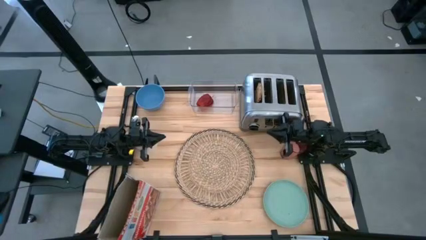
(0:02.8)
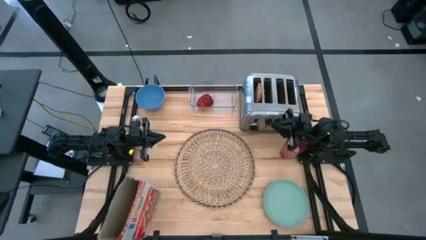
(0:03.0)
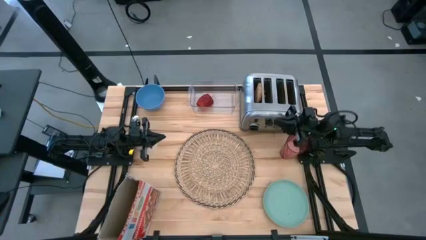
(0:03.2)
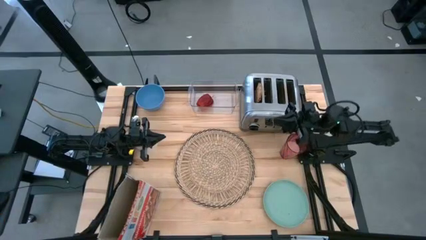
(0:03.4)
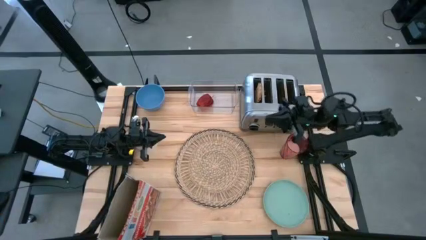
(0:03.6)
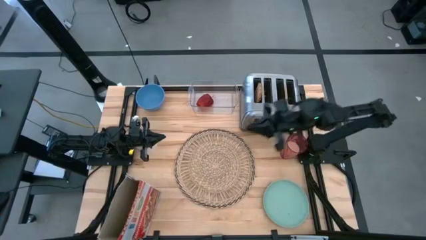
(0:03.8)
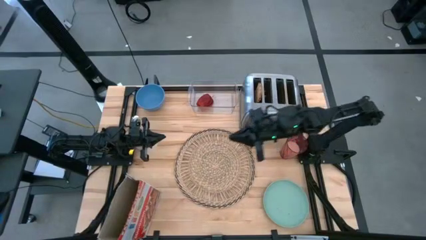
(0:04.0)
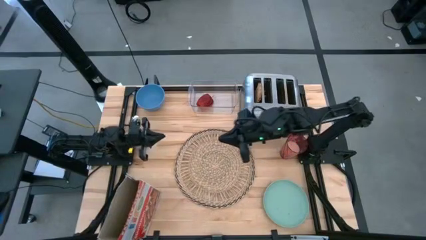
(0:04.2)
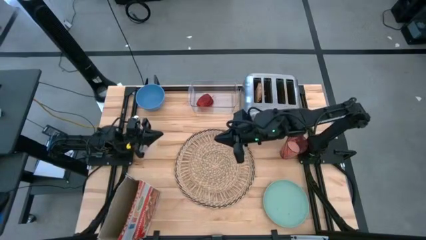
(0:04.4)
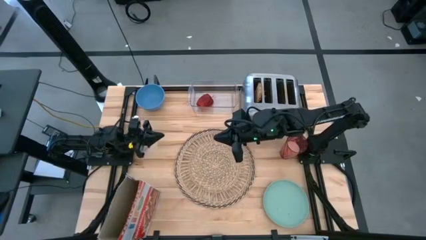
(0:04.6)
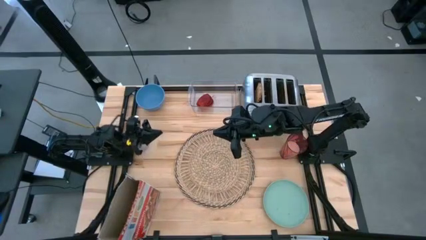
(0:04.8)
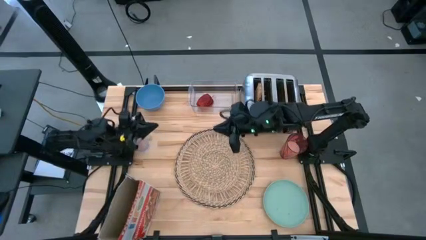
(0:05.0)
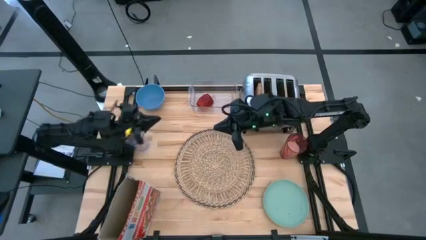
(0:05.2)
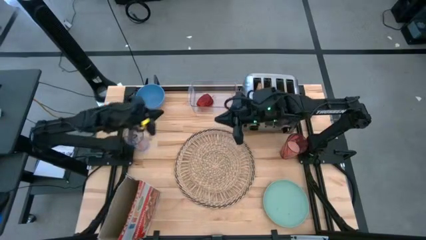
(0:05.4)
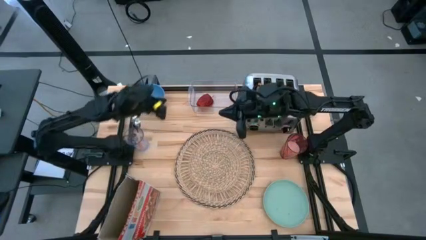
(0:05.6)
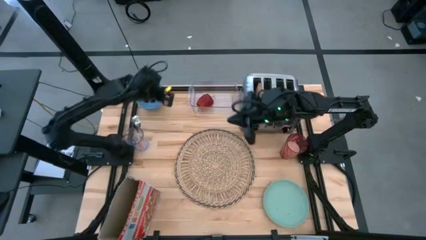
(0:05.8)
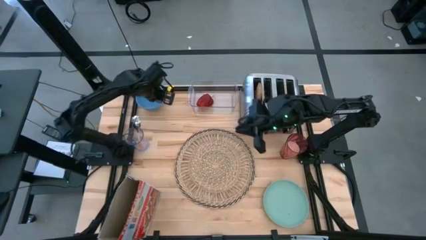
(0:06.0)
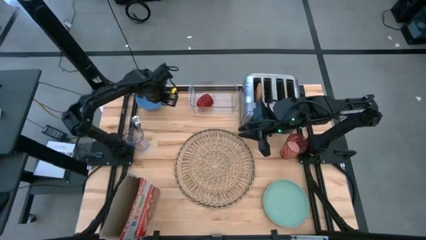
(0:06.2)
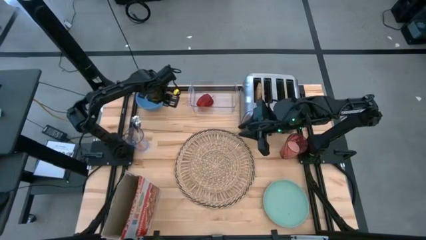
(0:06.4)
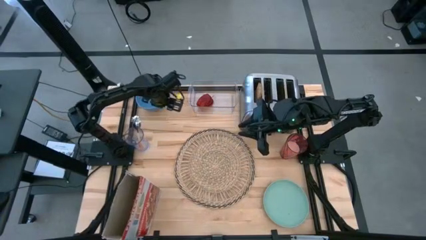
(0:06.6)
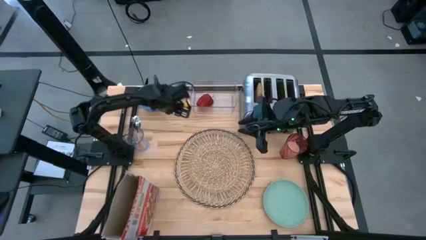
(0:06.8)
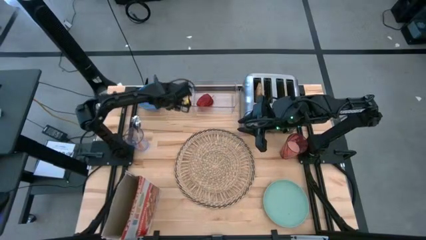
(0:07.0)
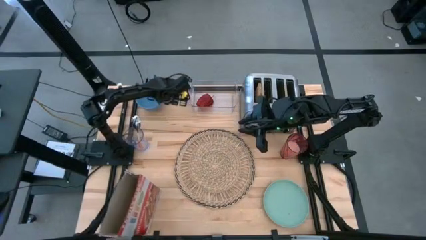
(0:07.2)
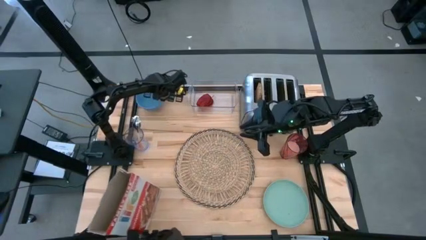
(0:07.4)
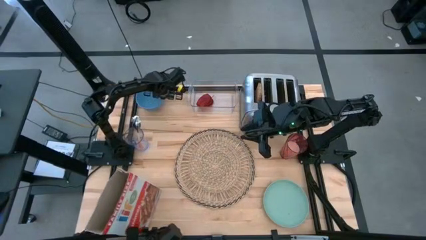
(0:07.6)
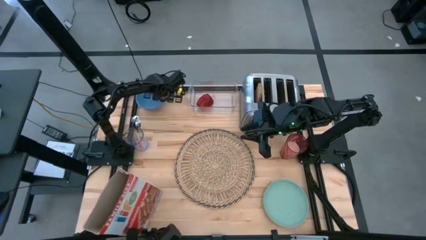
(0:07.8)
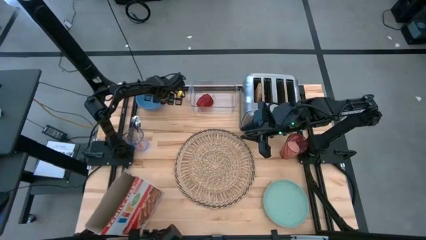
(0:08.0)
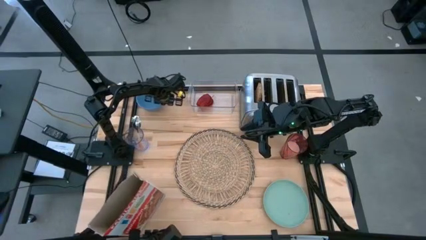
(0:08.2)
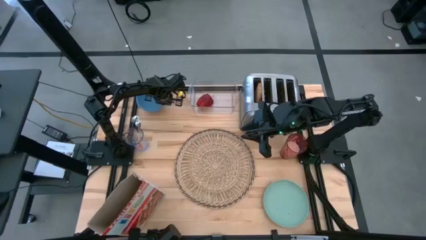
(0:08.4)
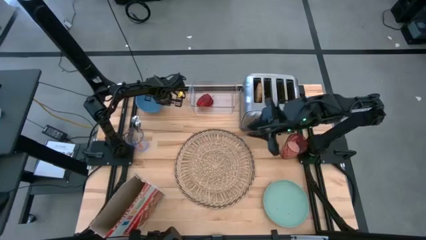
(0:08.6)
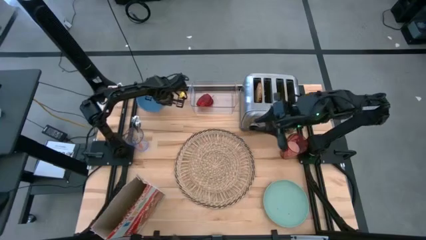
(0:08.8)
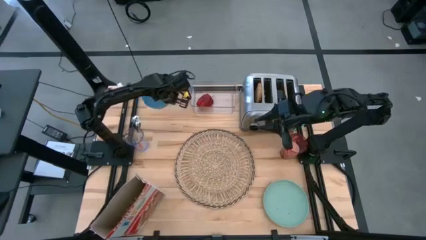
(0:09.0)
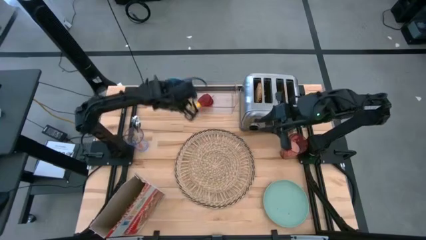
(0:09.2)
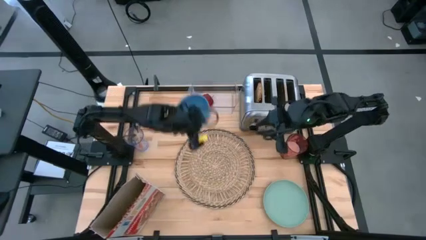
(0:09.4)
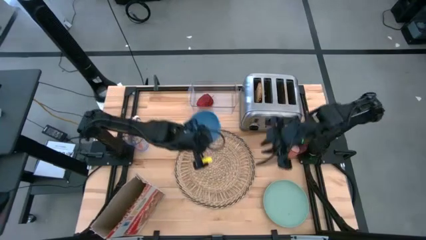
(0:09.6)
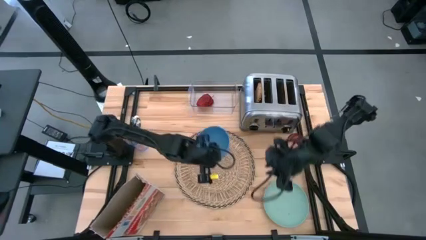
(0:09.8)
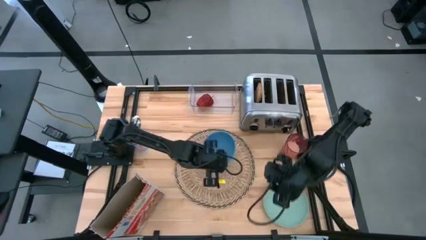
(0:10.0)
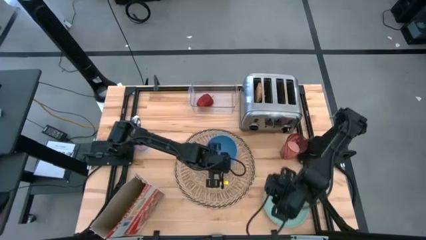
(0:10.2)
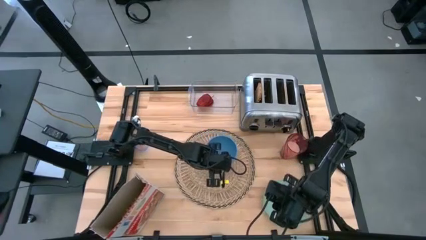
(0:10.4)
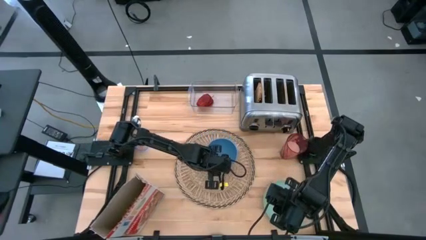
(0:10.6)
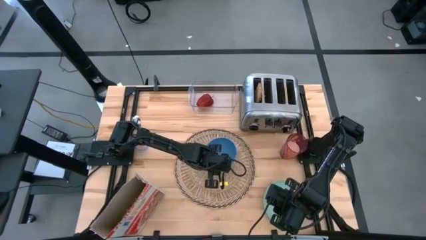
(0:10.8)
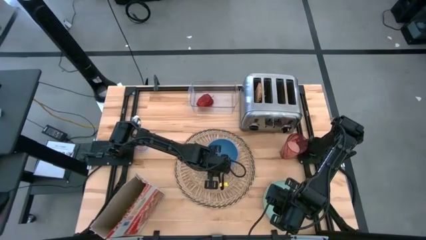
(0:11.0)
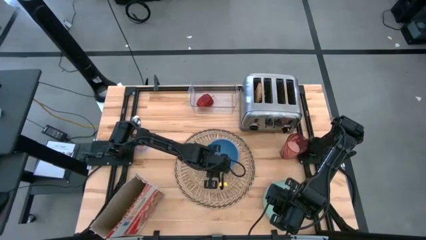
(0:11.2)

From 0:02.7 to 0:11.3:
Task: Arrange a breakfast setting
Put the blue bowl on the top right of the brown table mat

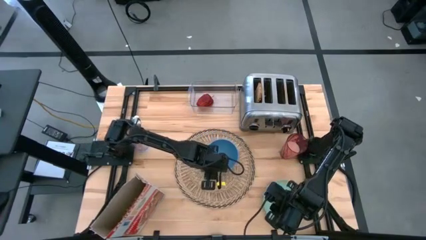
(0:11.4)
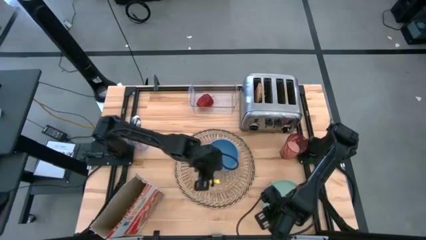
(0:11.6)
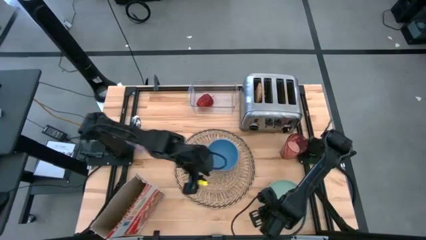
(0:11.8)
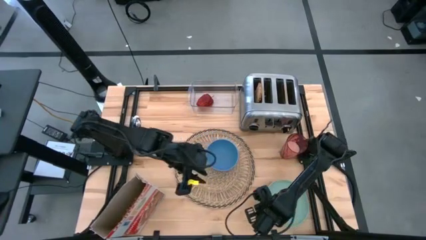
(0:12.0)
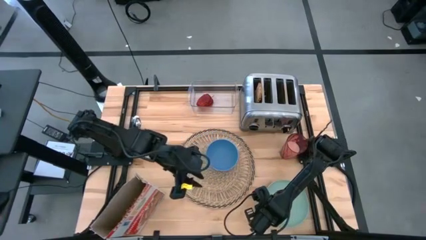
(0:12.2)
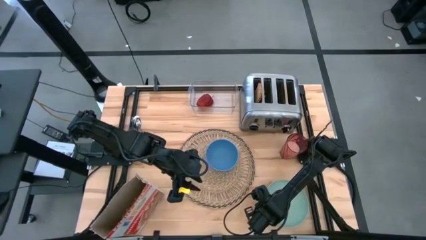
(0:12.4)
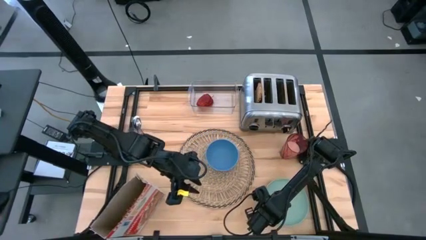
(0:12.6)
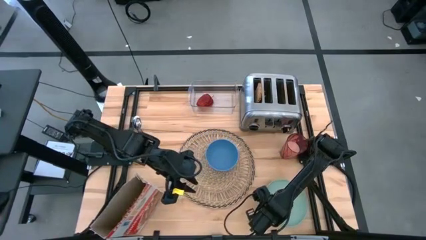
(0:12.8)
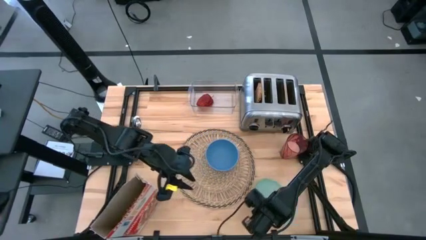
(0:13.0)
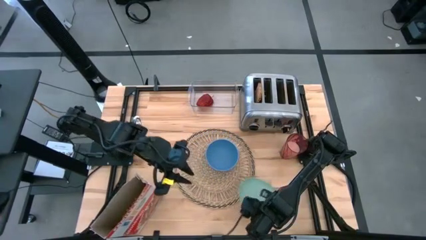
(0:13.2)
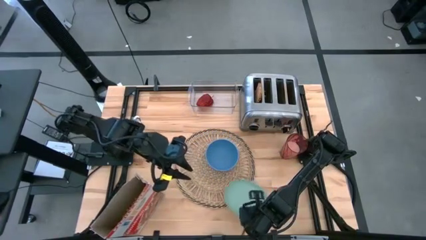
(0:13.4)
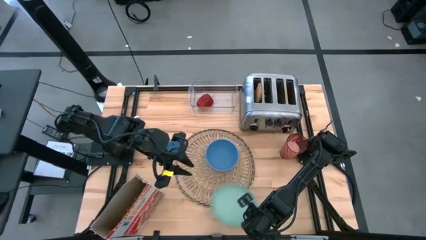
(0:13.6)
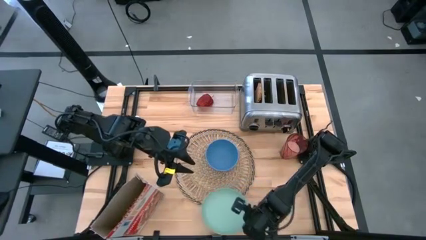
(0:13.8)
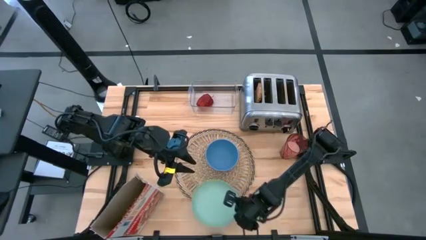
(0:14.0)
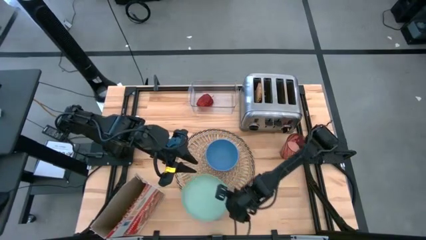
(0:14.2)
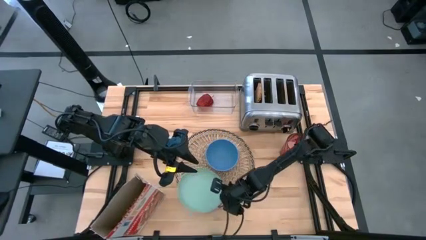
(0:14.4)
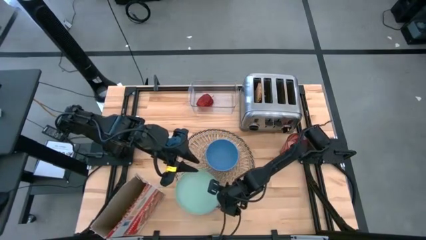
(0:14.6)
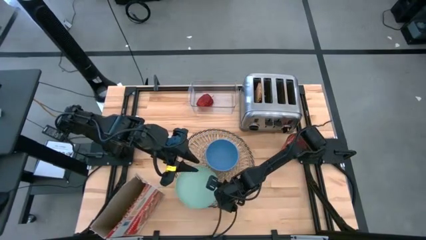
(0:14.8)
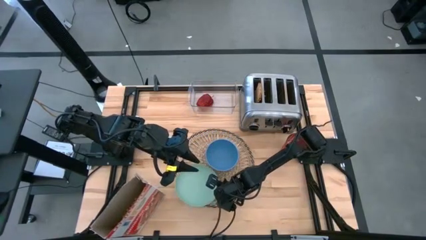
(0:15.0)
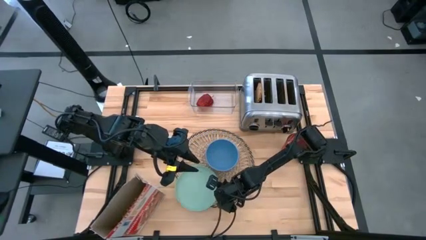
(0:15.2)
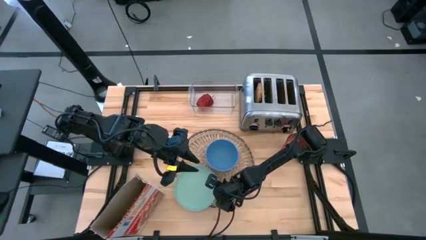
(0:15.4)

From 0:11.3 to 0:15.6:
Put the light blue plate on the brown table mat to the bottom left of the blue bowl

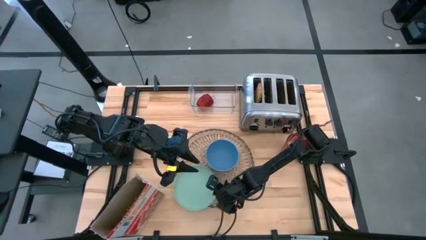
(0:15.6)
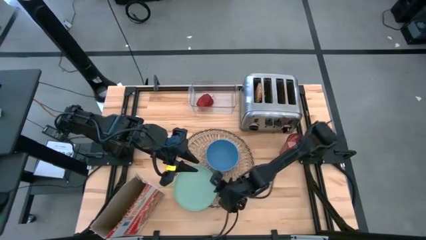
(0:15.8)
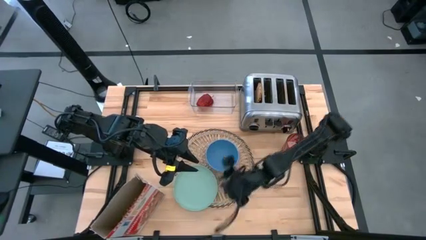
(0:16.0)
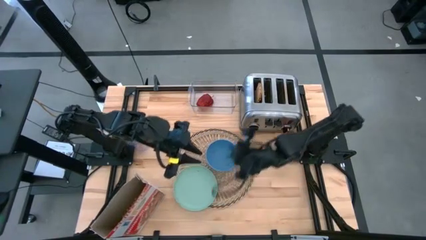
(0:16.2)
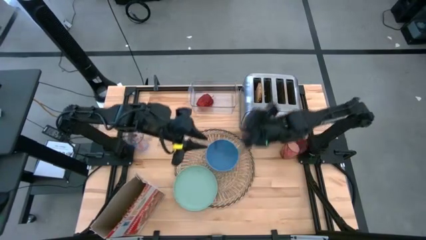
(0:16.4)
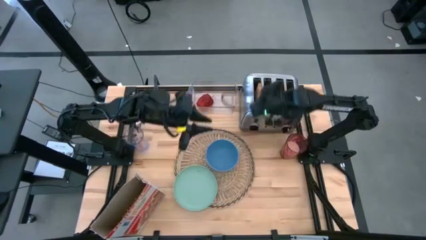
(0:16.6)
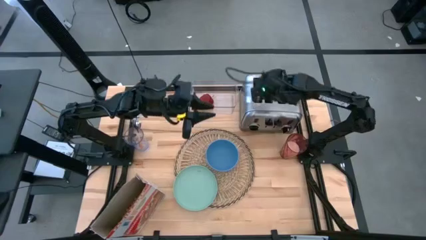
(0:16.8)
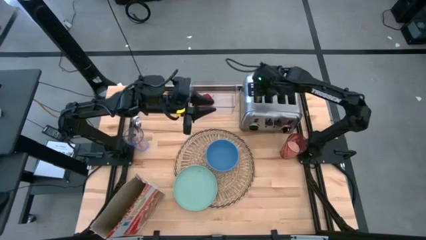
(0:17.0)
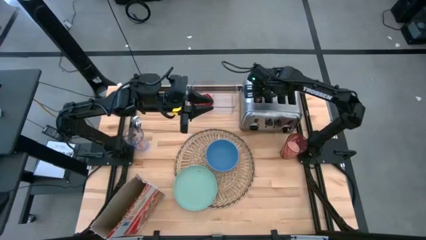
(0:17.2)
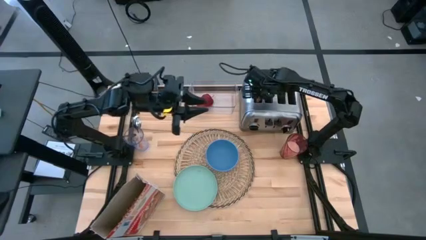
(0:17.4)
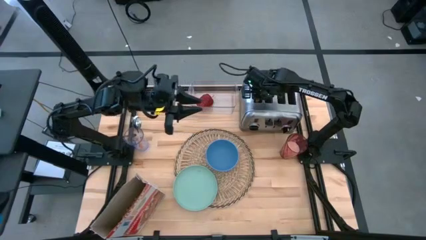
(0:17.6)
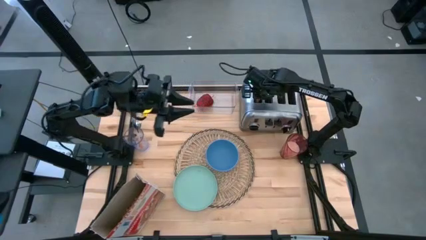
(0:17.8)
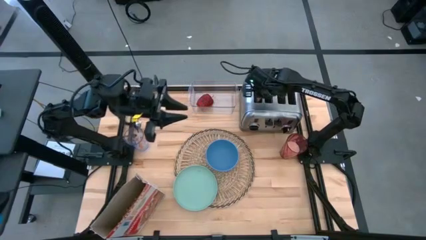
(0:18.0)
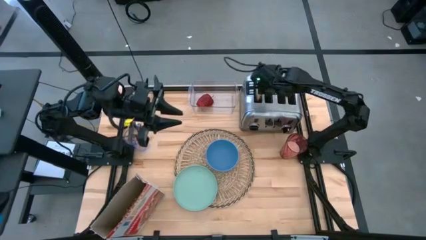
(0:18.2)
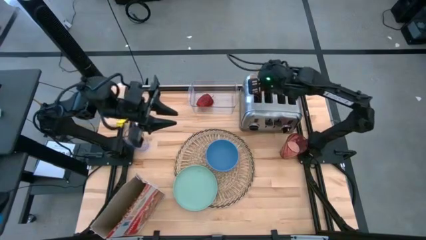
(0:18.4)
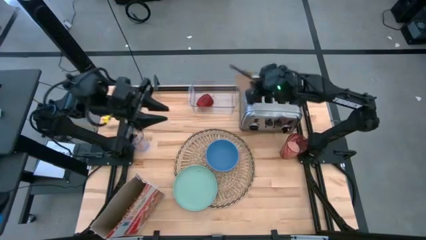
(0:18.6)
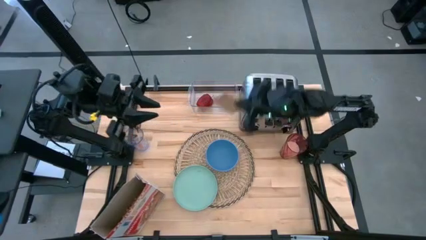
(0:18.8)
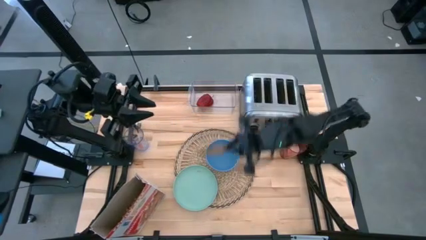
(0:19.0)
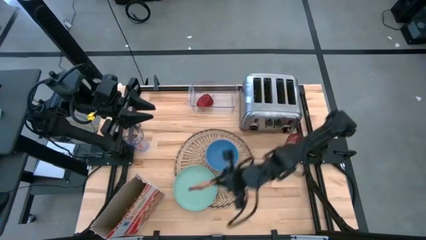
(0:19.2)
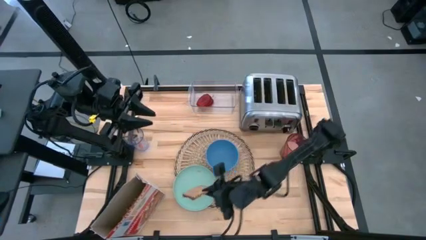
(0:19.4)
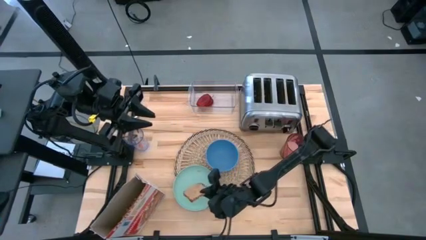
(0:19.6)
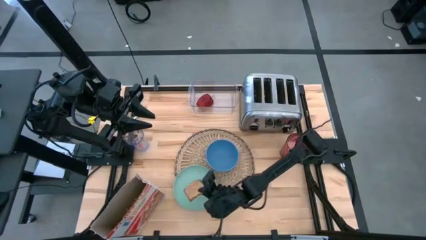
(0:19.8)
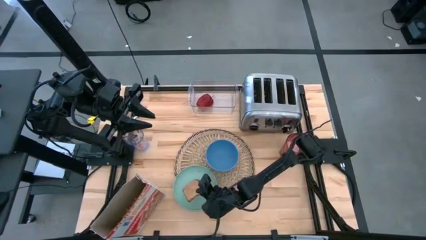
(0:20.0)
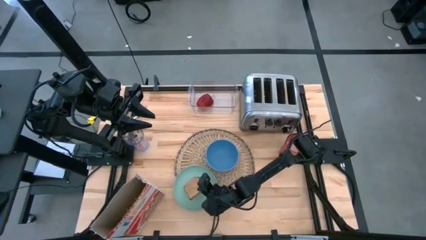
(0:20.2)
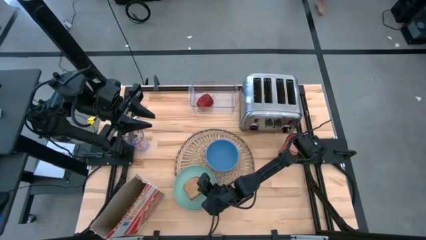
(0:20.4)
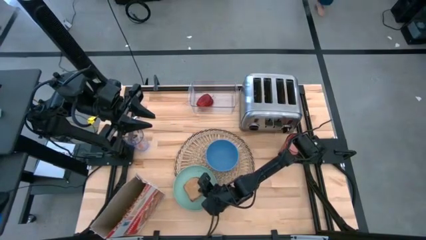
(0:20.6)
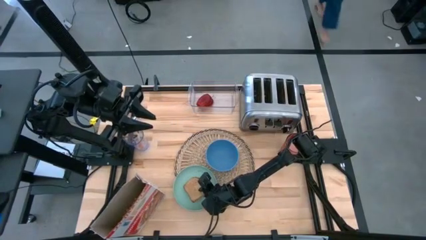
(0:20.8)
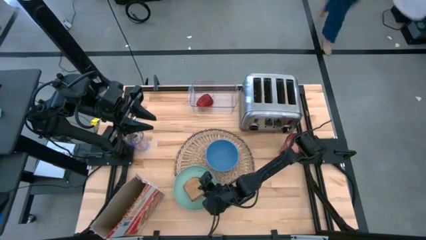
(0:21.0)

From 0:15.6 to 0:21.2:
Put the toasted bread on the light green plate
